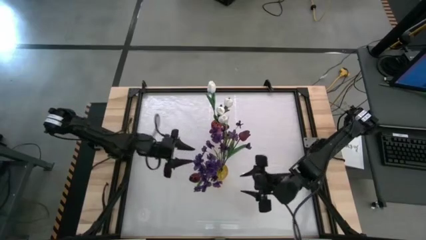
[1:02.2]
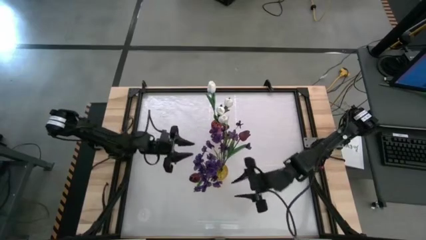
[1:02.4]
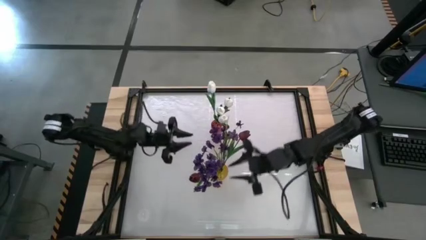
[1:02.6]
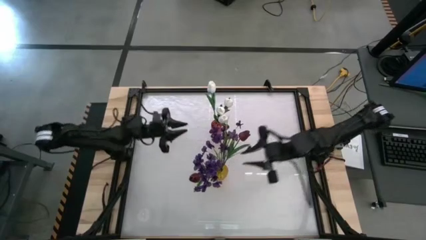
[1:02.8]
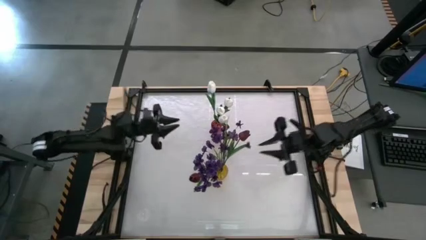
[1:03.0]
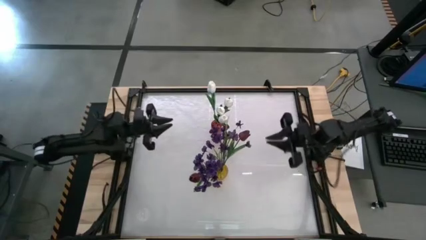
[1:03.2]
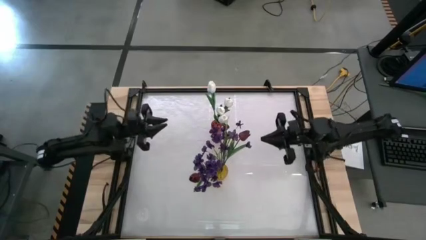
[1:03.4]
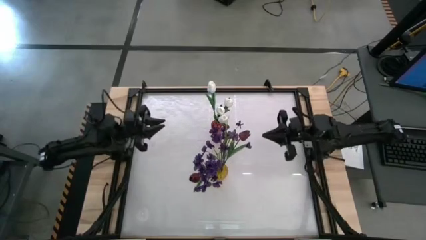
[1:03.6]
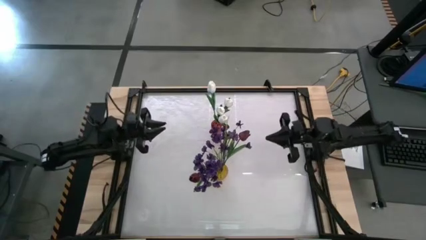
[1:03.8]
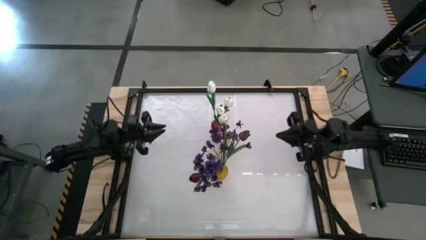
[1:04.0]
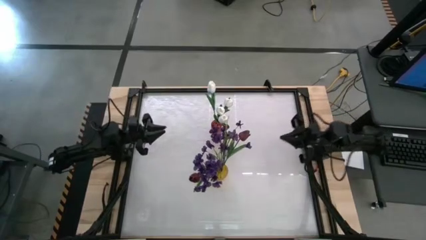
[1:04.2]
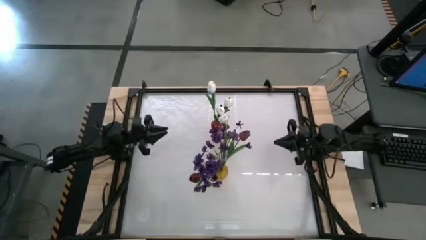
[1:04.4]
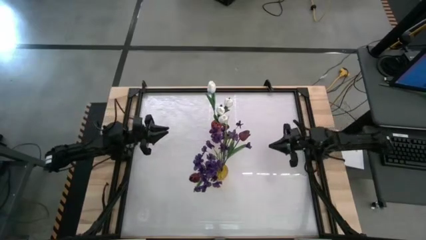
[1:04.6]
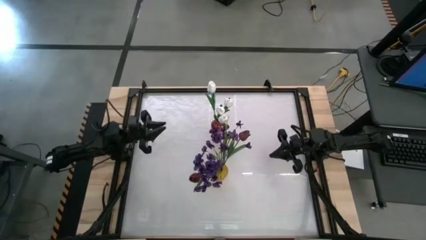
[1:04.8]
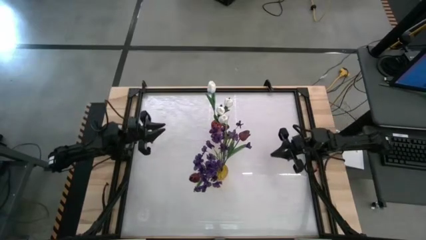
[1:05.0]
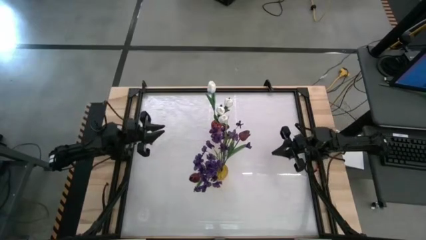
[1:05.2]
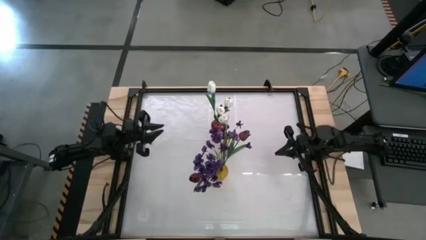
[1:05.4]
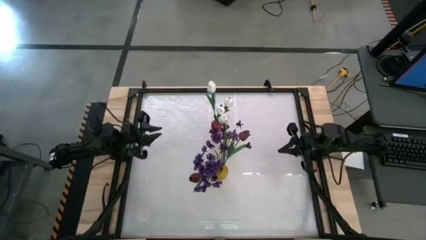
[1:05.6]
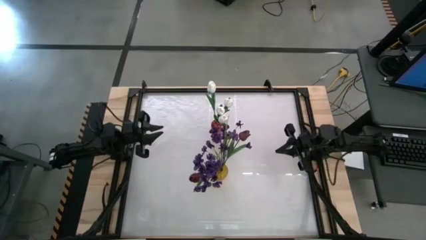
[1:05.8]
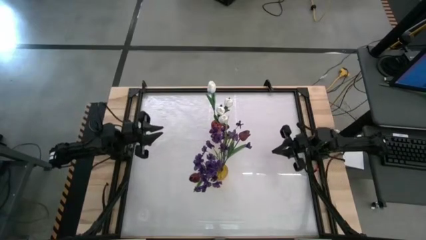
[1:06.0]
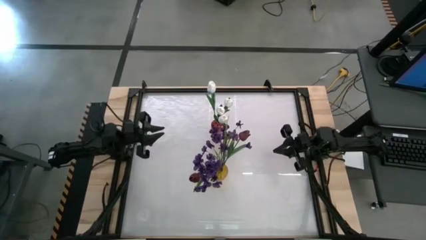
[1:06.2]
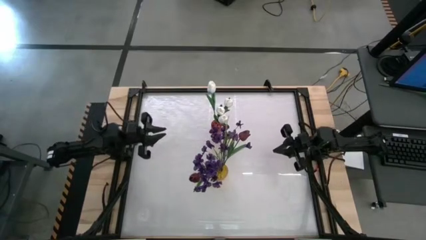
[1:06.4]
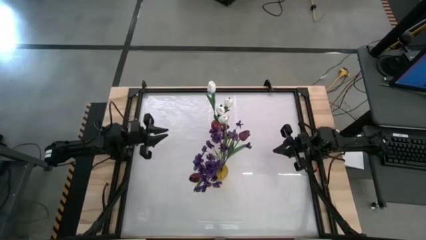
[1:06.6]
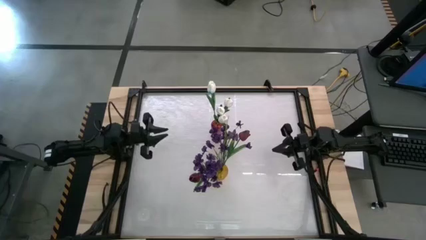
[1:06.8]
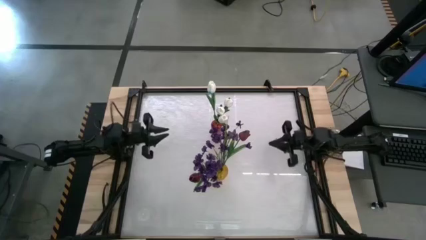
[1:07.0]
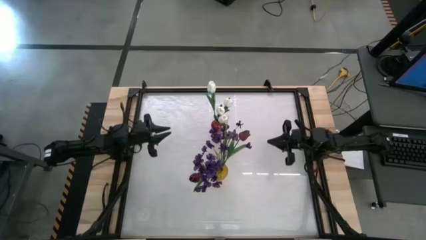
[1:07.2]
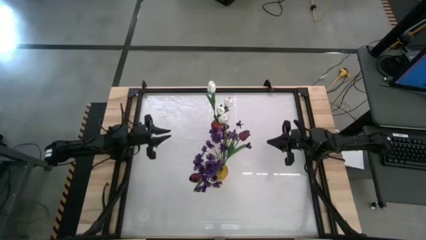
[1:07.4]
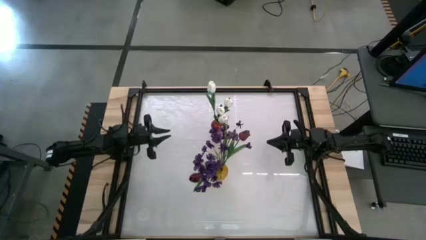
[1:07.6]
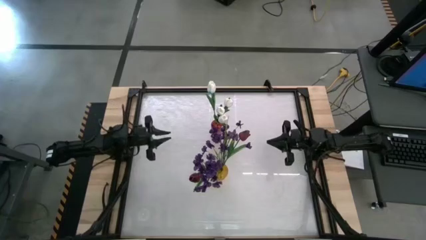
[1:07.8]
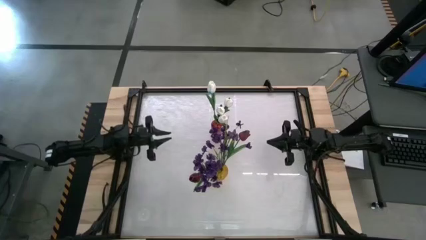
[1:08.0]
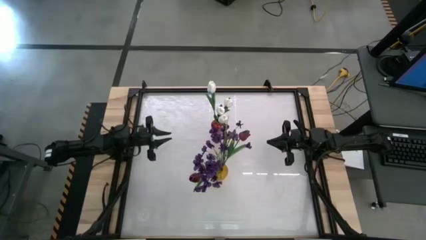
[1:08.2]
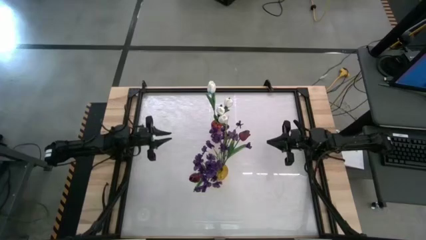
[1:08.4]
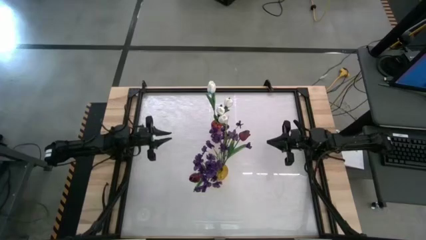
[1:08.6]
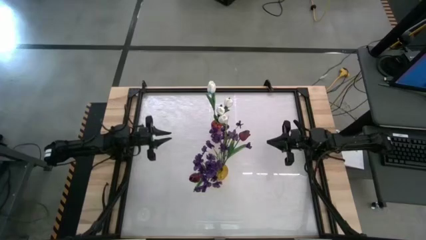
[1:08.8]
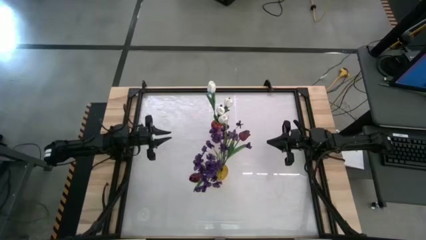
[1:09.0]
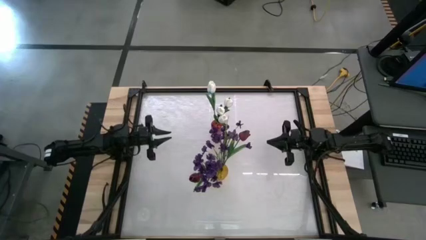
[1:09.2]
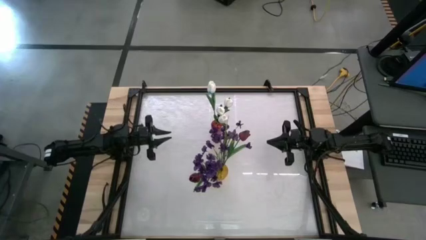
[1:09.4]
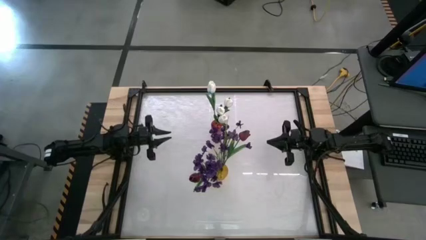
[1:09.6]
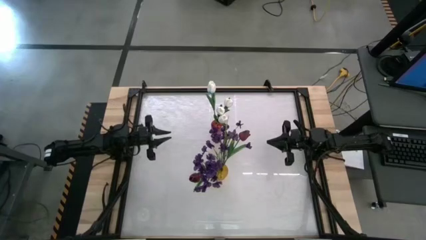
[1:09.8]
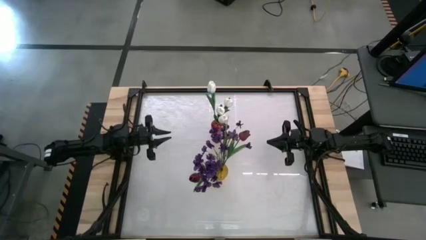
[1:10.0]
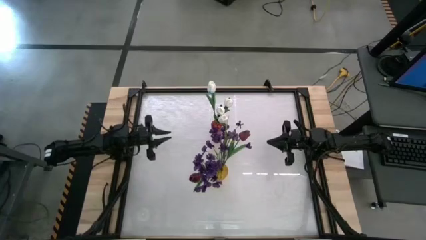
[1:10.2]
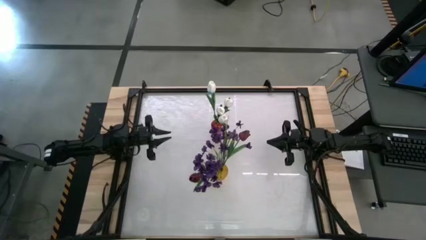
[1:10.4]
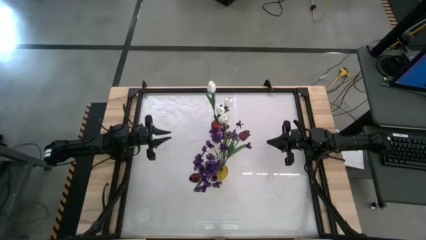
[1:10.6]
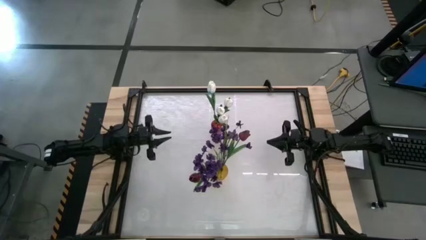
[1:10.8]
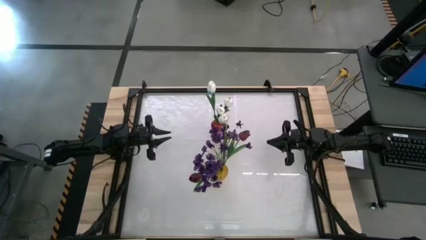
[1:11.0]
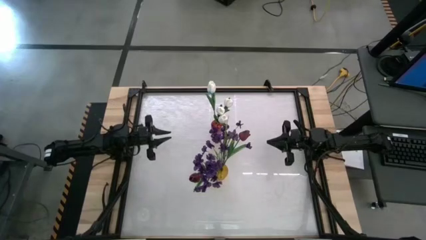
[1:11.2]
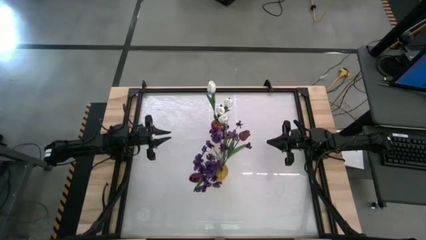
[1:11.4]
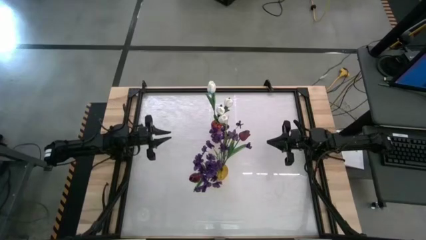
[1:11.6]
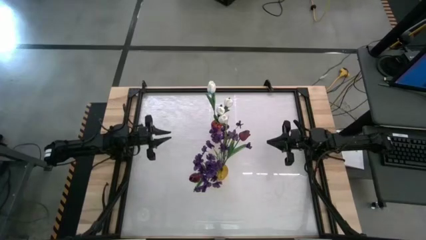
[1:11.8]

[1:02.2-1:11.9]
Task: Sort flowers into vase by color
Return to Home Position

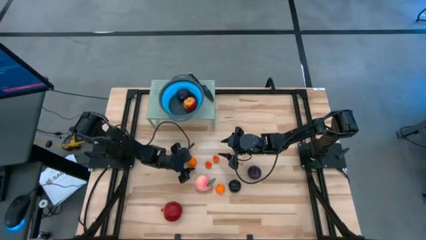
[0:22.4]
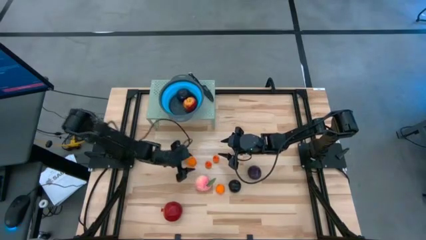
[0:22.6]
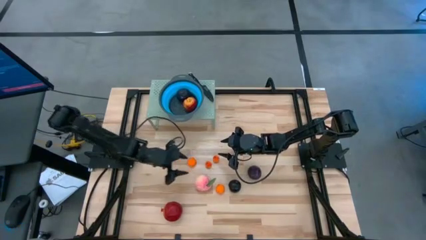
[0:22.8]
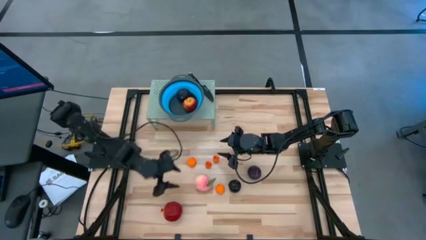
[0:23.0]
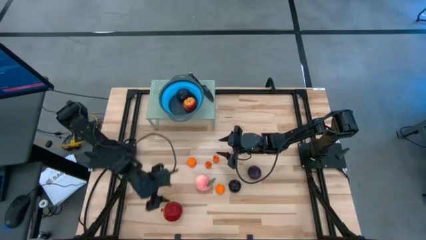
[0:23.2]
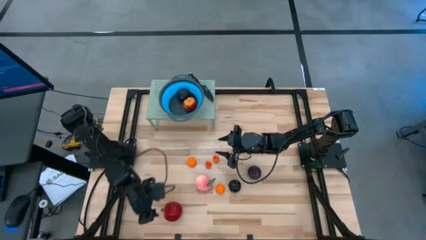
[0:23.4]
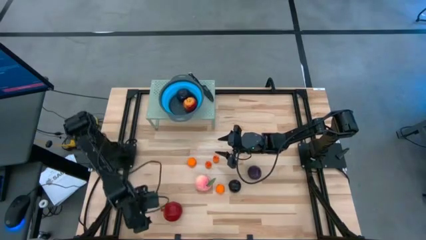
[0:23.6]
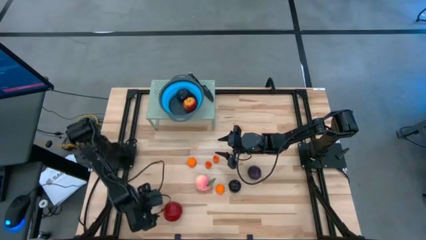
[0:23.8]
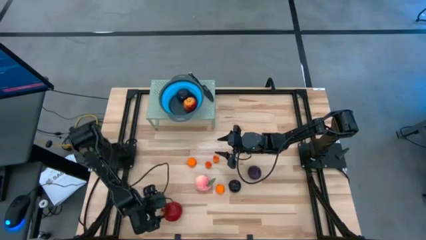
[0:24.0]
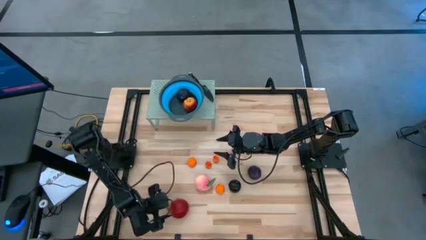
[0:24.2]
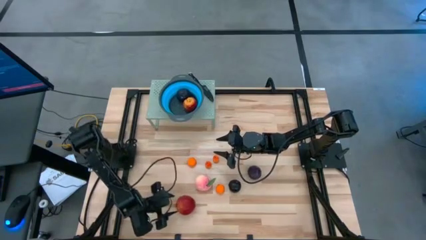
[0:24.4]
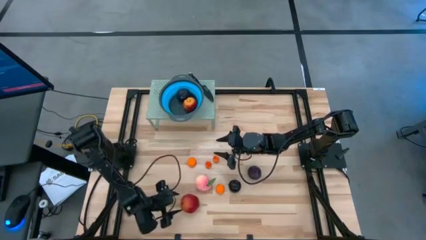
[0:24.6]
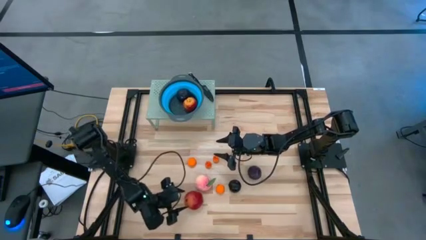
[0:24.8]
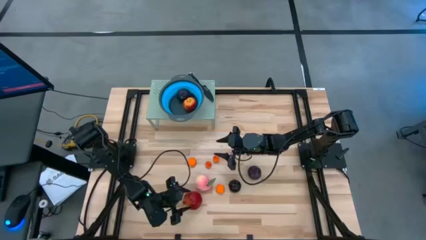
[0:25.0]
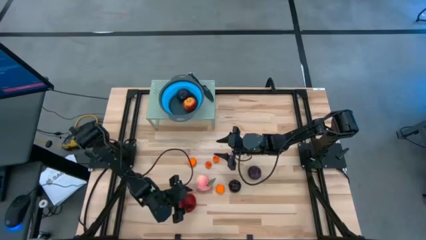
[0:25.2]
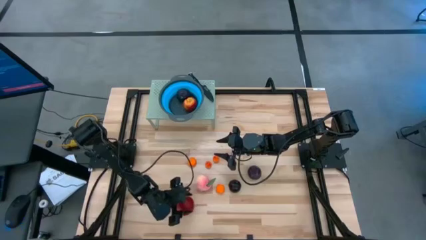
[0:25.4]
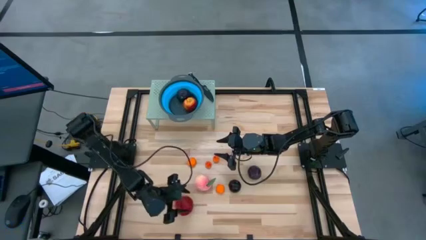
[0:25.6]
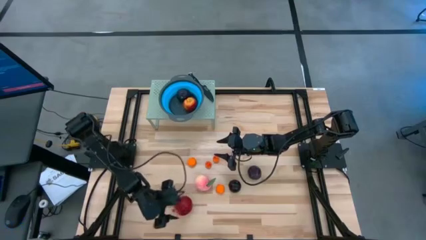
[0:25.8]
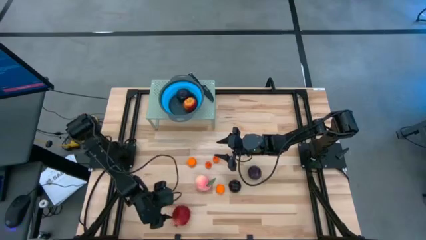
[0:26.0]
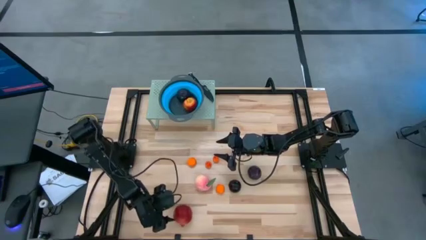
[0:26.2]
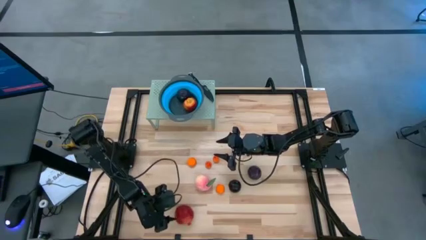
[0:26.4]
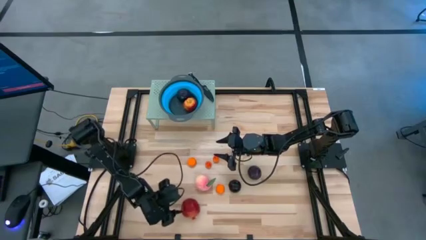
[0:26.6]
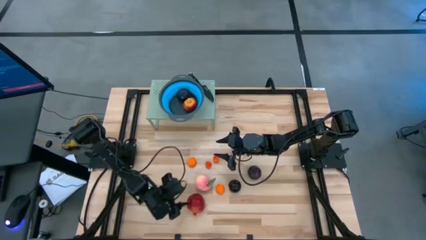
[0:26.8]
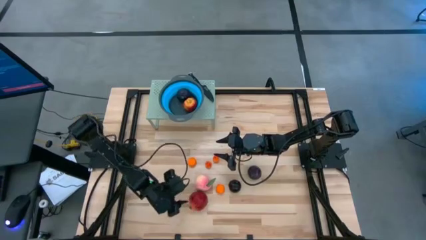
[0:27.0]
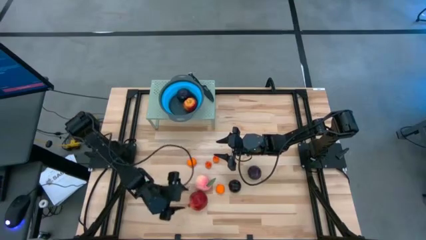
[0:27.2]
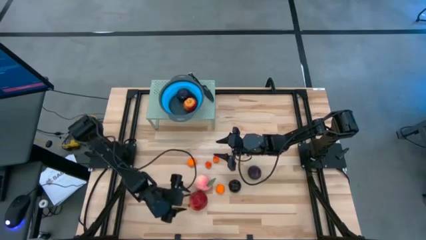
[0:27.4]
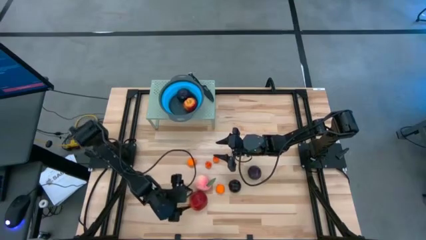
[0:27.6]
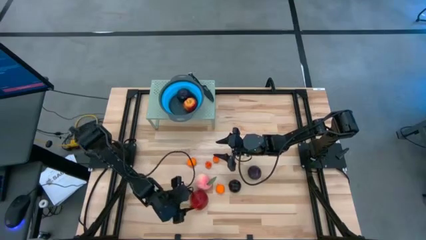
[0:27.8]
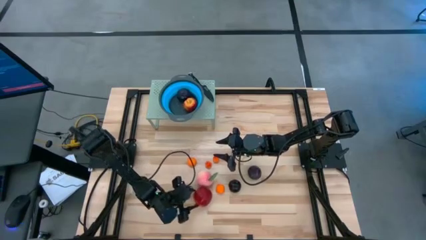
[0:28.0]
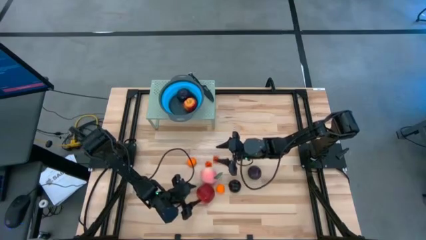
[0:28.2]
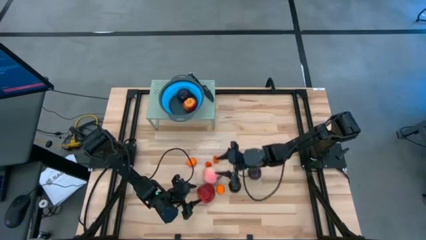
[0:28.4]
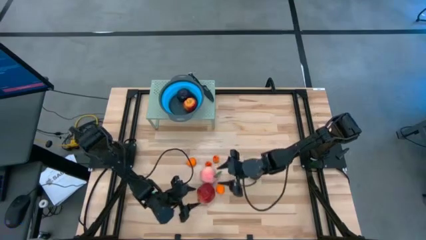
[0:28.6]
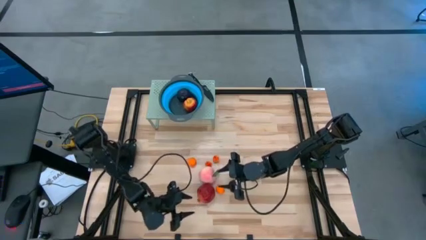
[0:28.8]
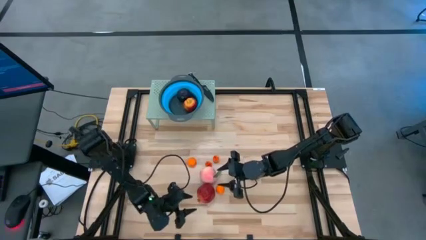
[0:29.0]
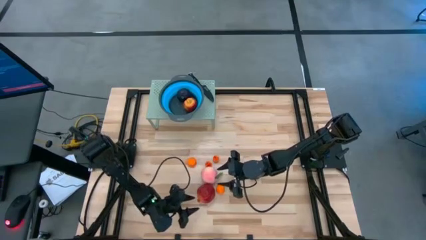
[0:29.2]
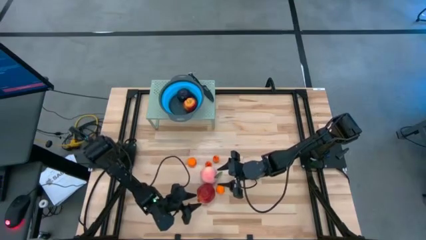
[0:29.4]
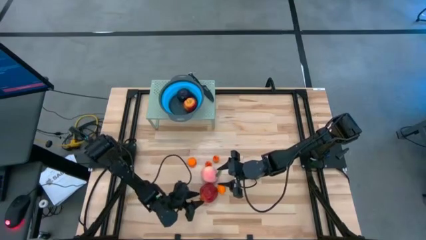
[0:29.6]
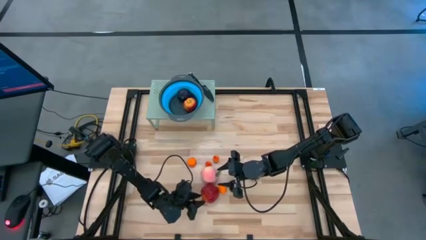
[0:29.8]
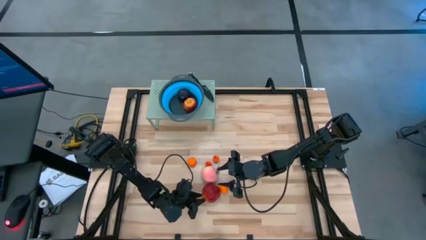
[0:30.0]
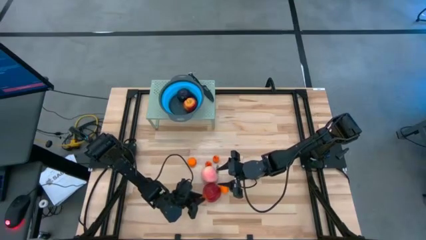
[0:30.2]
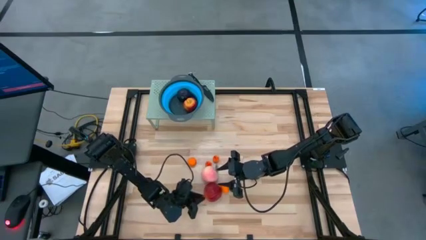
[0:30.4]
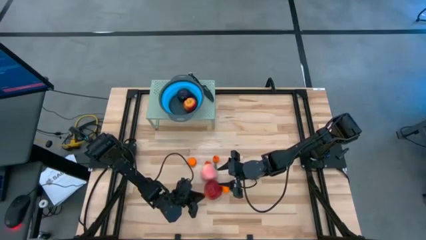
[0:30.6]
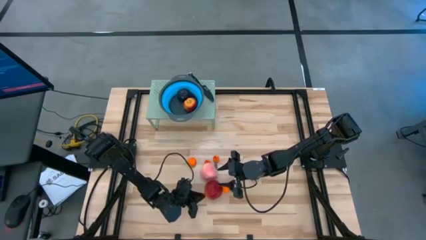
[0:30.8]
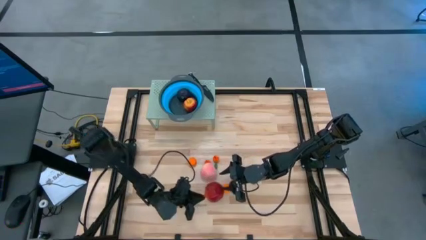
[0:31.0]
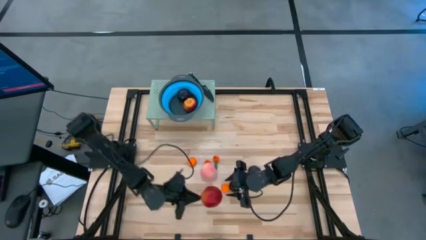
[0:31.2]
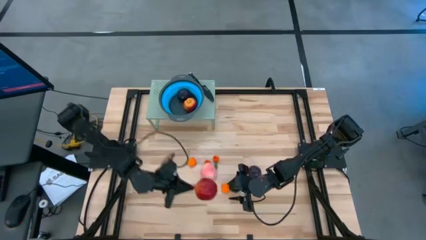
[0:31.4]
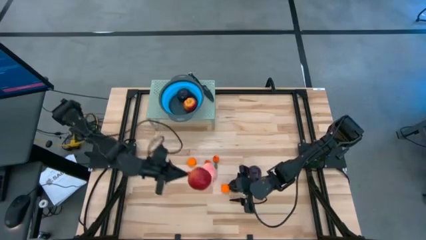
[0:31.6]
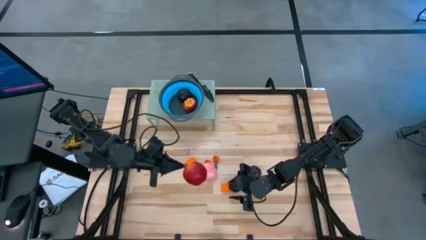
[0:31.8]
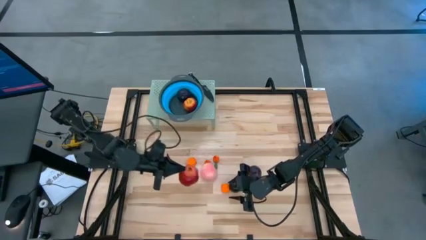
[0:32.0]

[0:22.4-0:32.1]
Task: Pick & Place Fruit
Put the red pomegranate into the blue strainer bowl on the shelf
